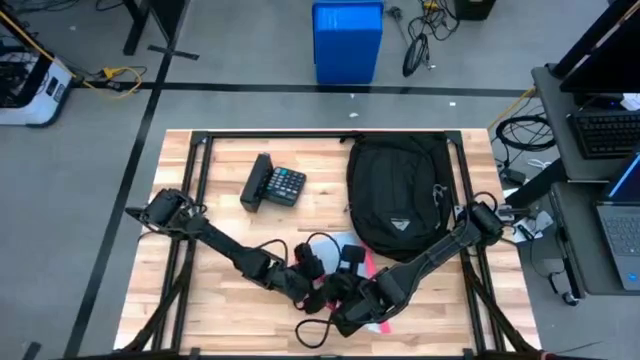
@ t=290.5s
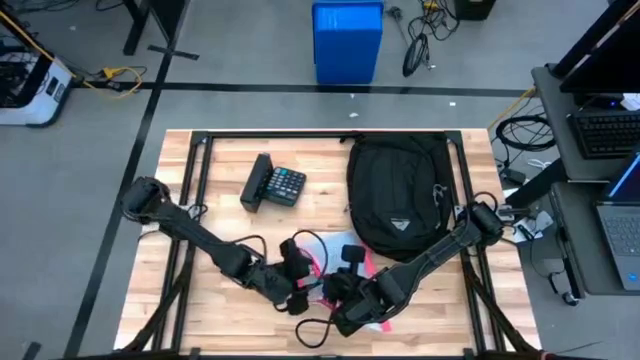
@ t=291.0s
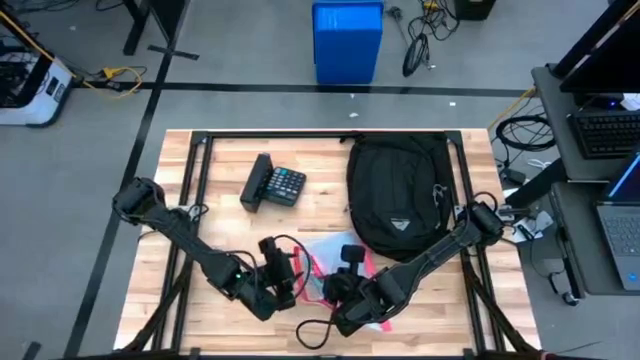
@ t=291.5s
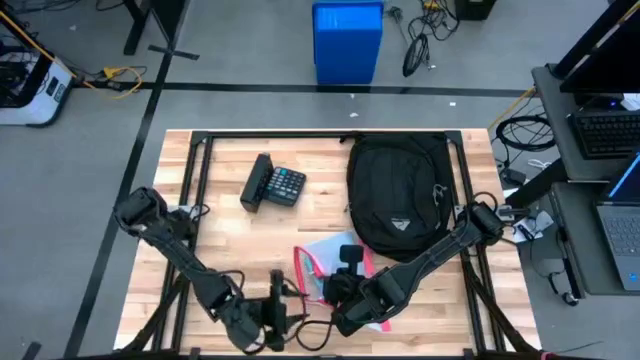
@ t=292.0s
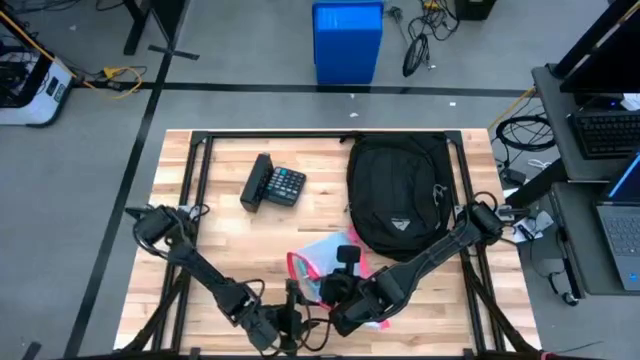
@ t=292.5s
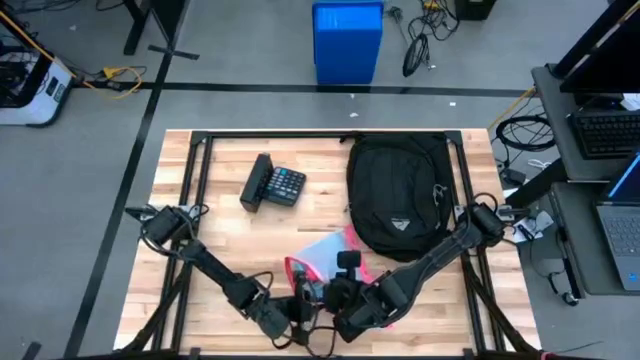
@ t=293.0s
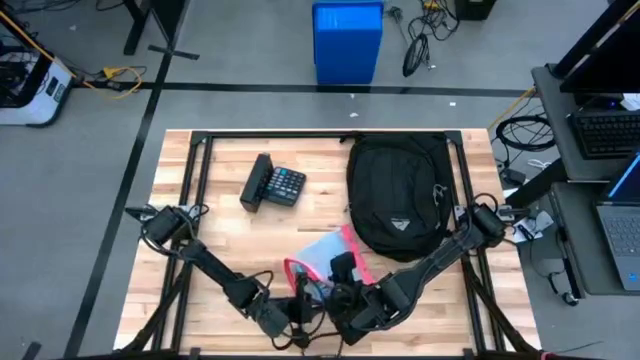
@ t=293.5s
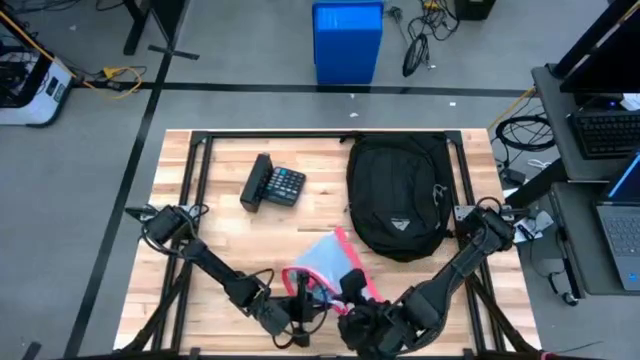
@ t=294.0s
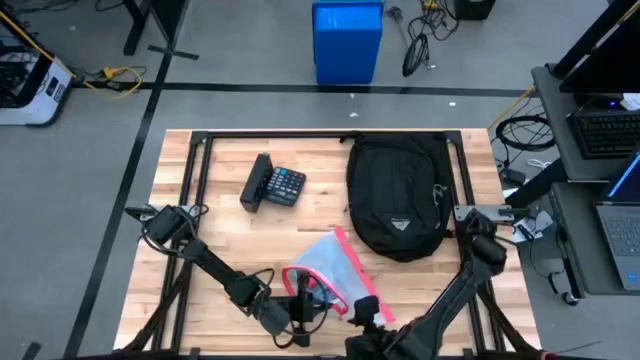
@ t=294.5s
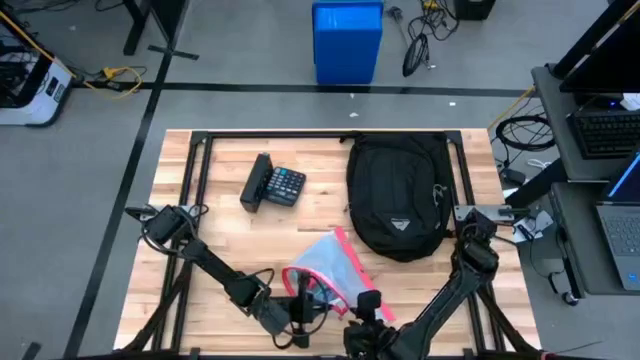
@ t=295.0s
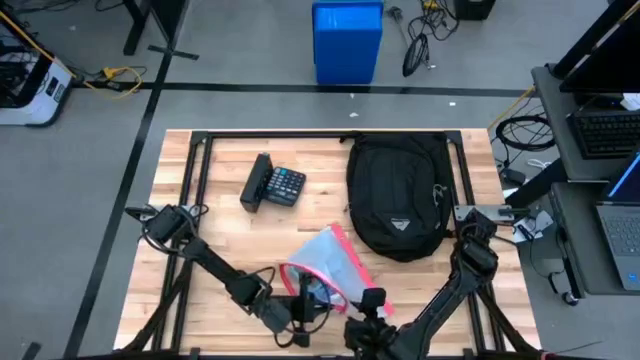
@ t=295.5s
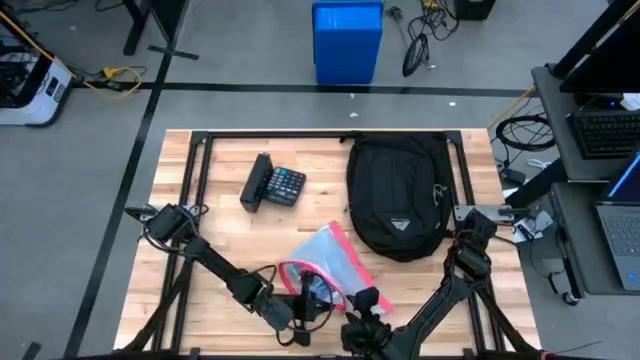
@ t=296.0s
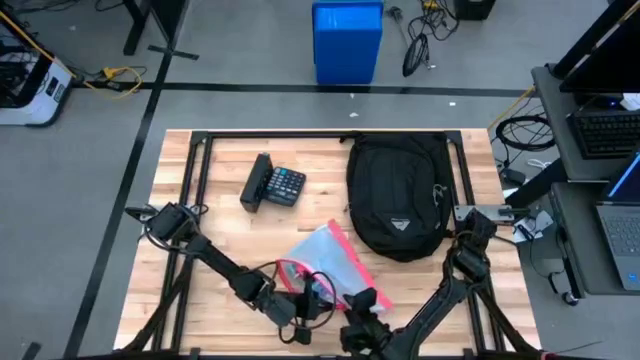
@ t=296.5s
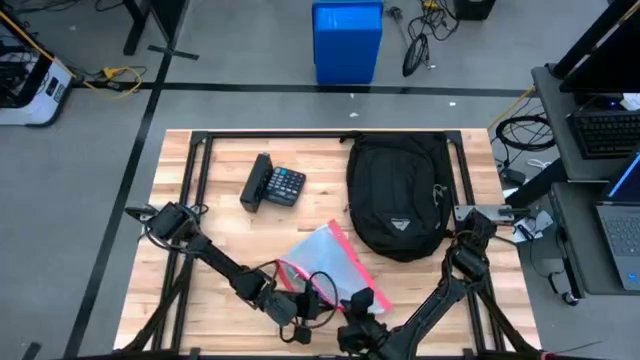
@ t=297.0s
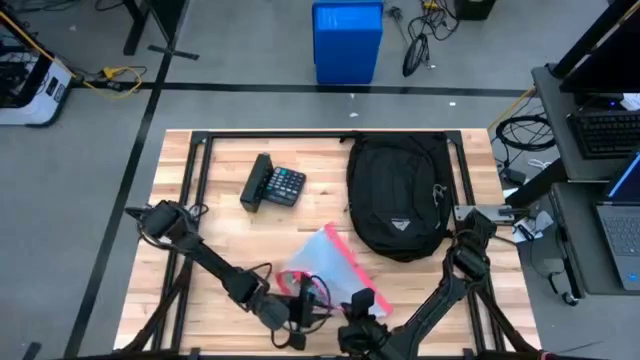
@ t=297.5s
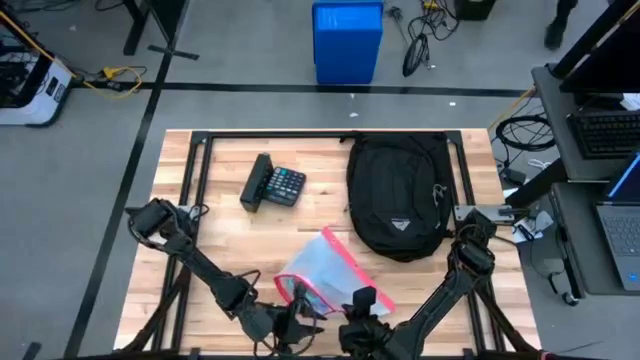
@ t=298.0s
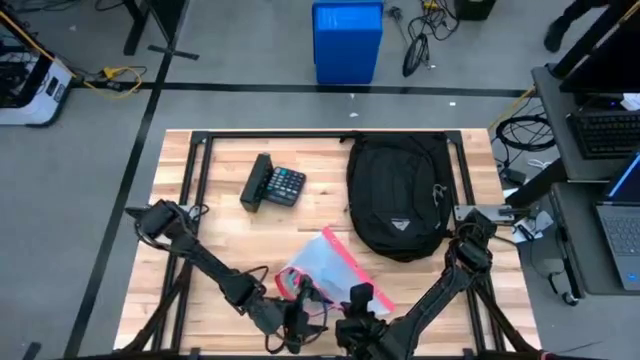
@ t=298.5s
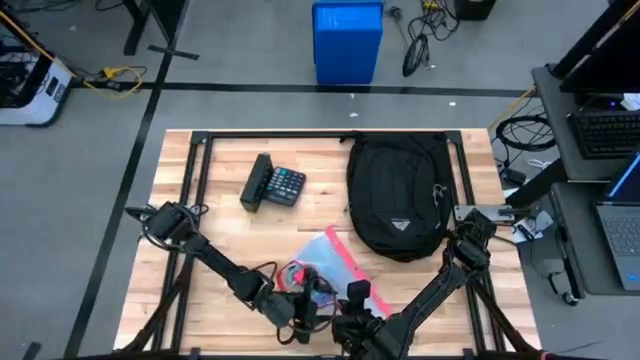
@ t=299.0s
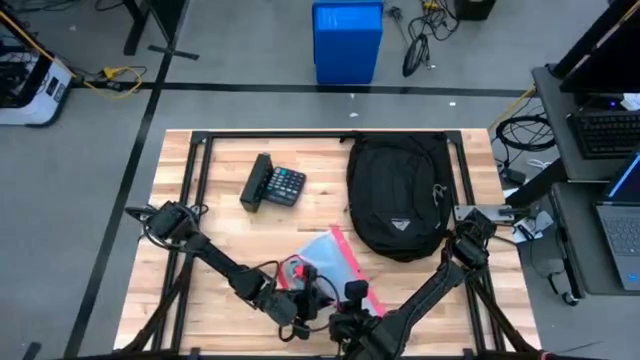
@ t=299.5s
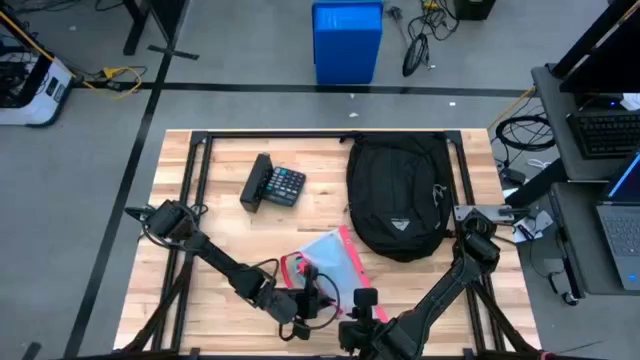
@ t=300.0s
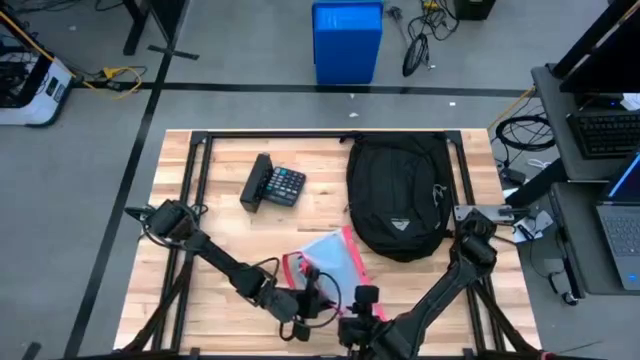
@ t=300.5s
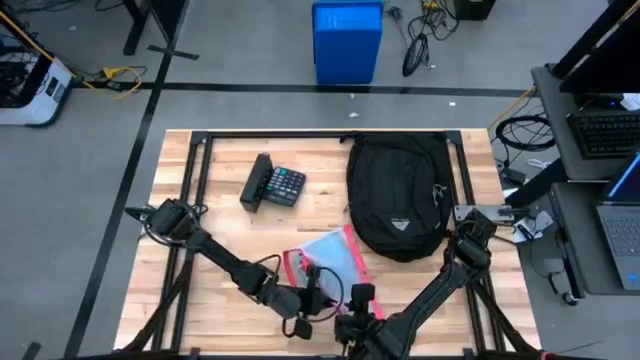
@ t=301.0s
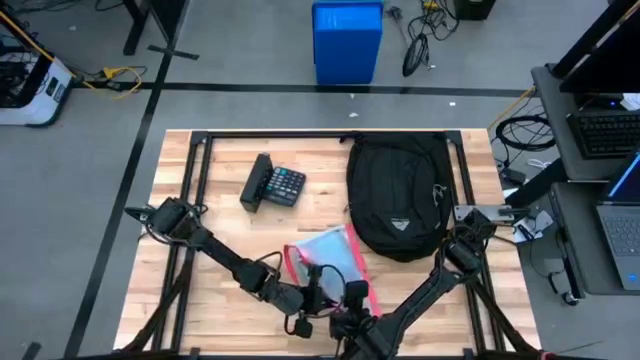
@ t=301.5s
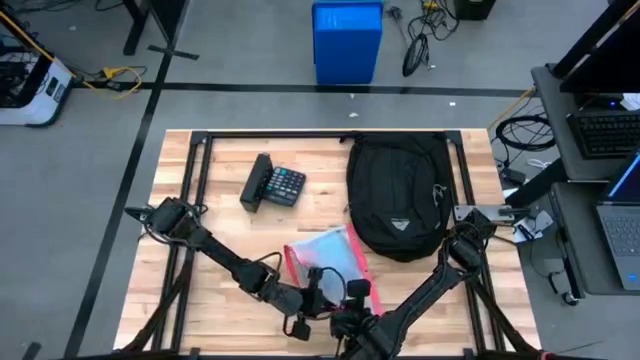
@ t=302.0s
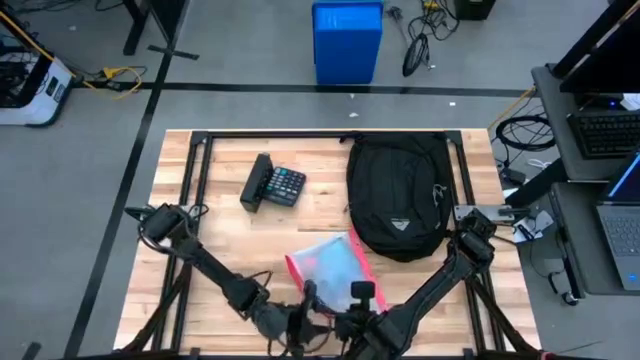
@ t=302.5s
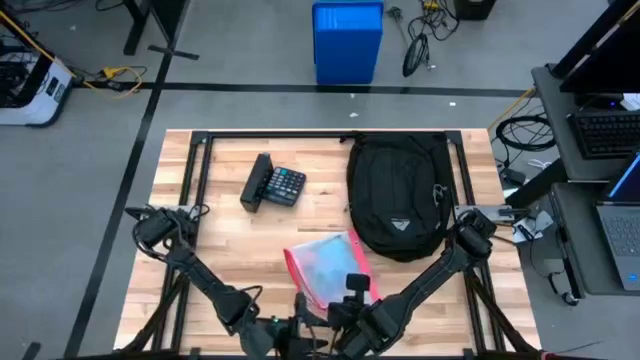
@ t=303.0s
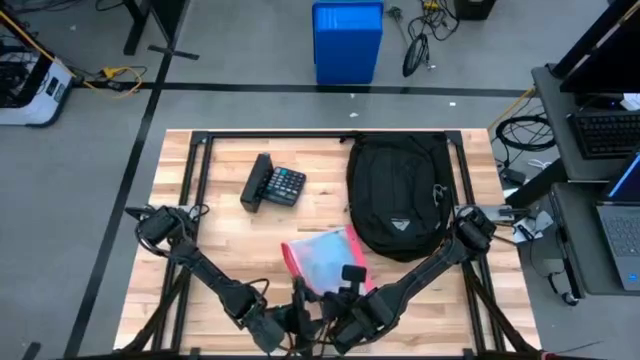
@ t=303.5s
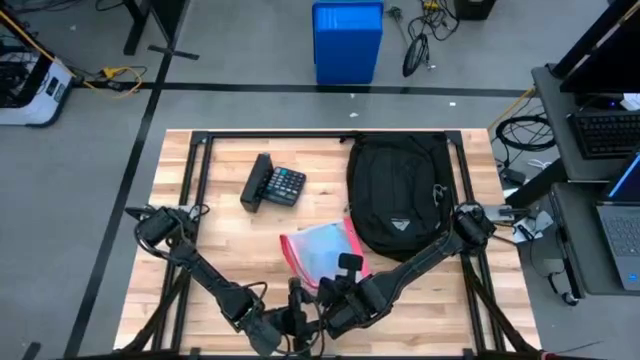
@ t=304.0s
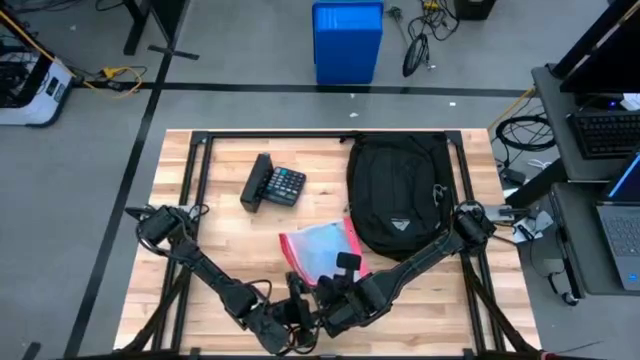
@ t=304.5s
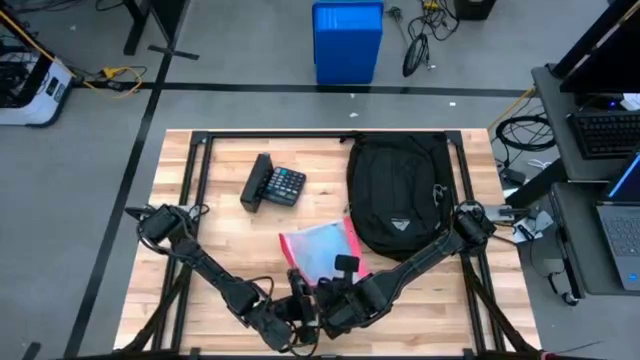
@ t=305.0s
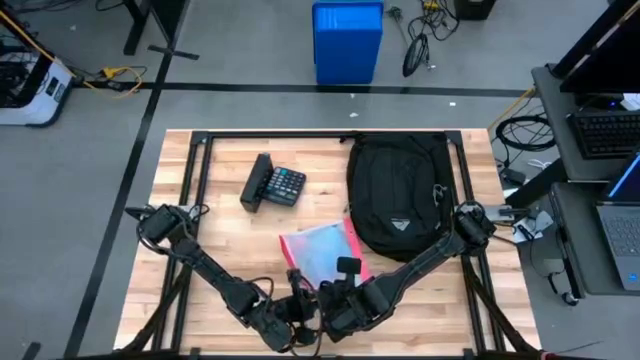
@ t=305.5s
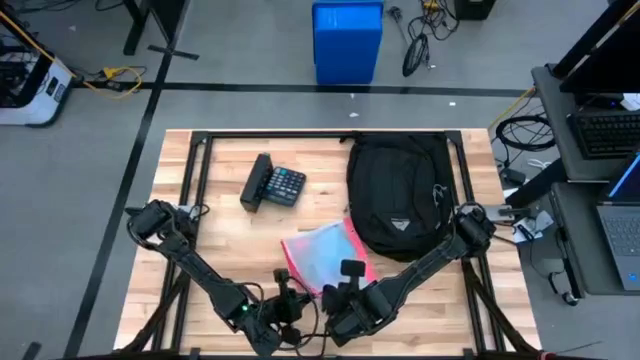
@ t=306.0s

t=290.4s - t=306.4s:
Task: Unpack backpack
Close the white zip bag

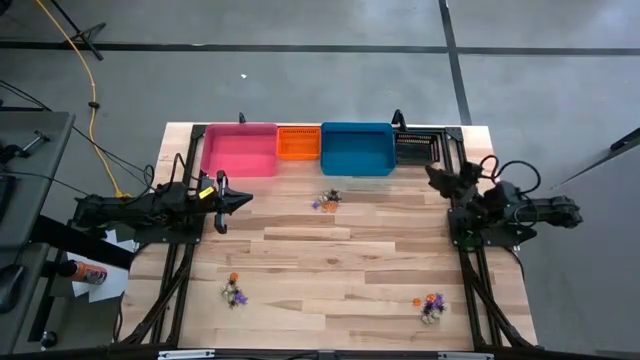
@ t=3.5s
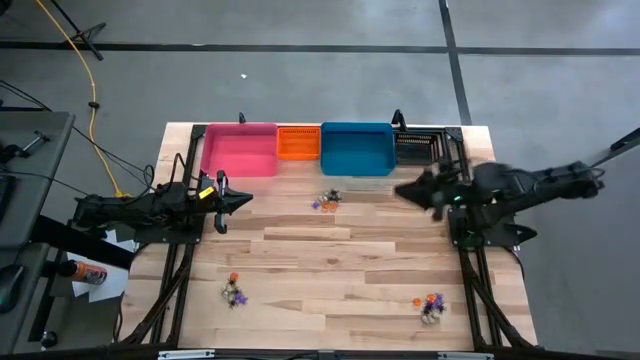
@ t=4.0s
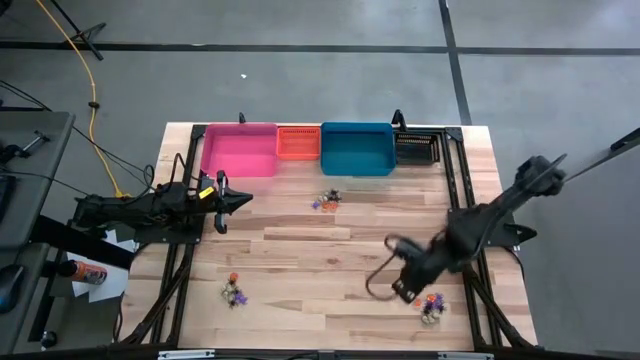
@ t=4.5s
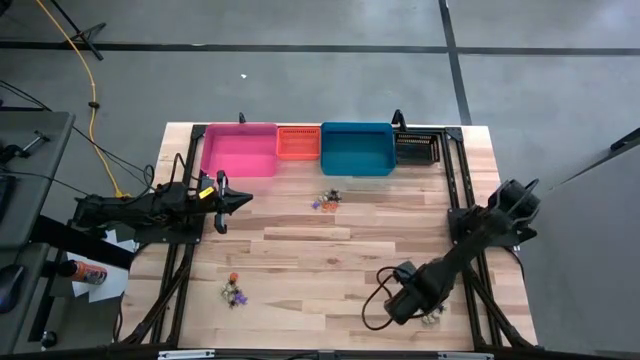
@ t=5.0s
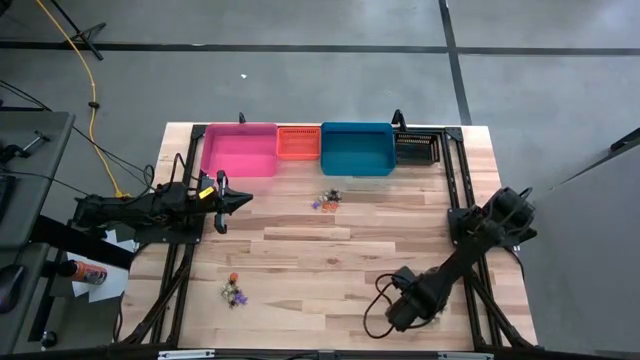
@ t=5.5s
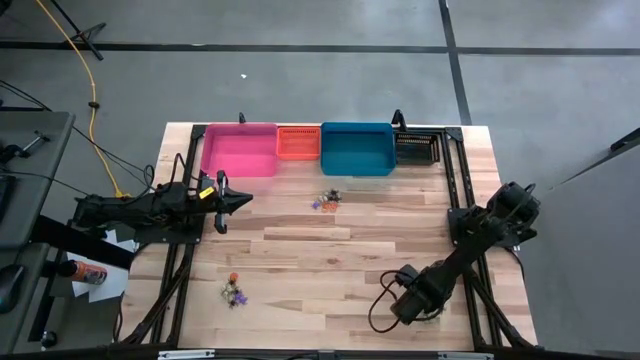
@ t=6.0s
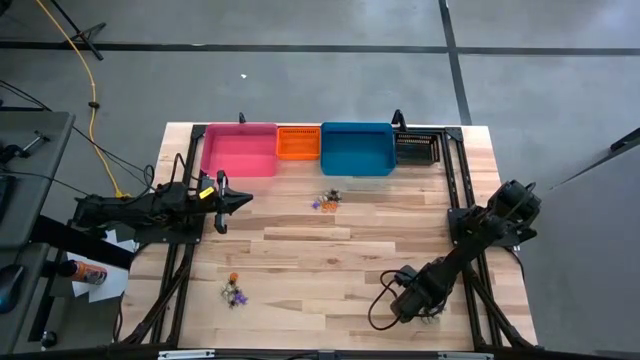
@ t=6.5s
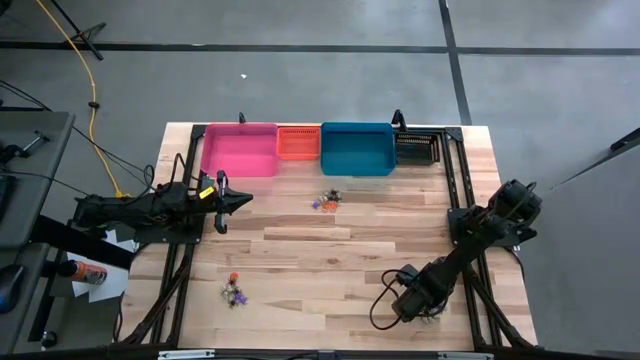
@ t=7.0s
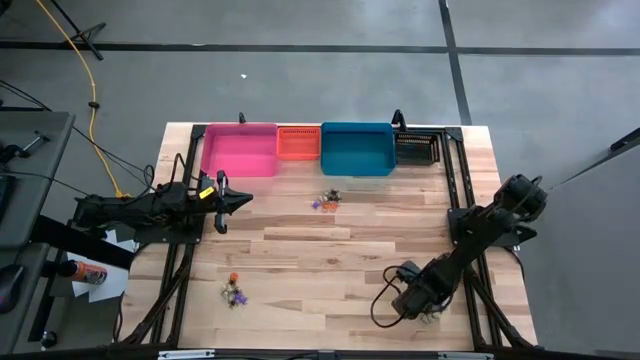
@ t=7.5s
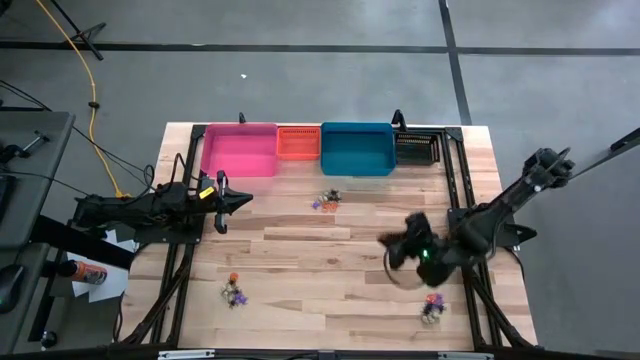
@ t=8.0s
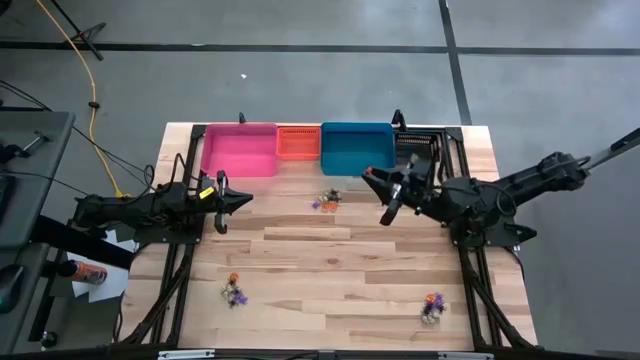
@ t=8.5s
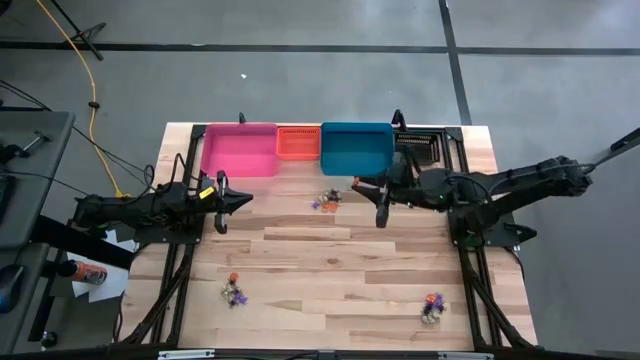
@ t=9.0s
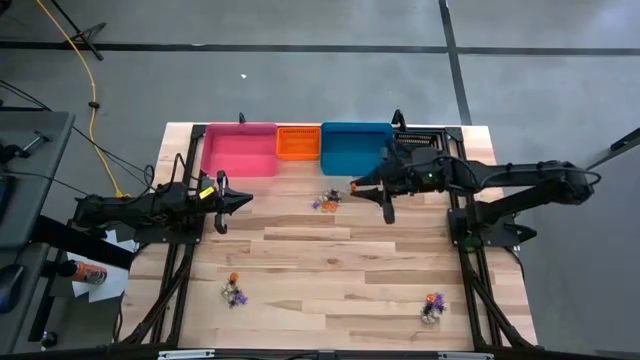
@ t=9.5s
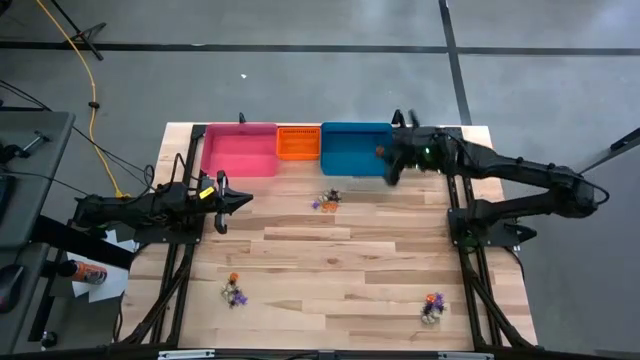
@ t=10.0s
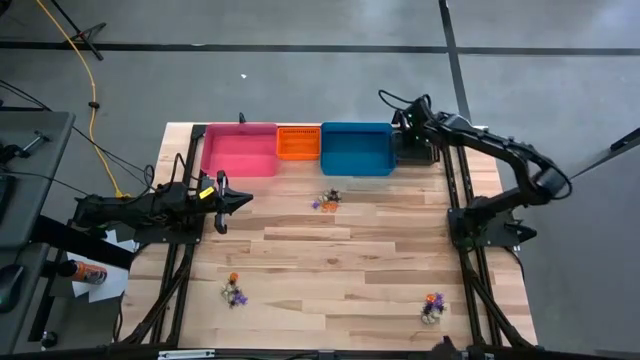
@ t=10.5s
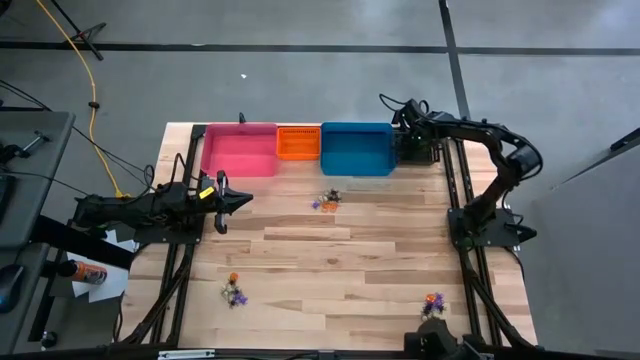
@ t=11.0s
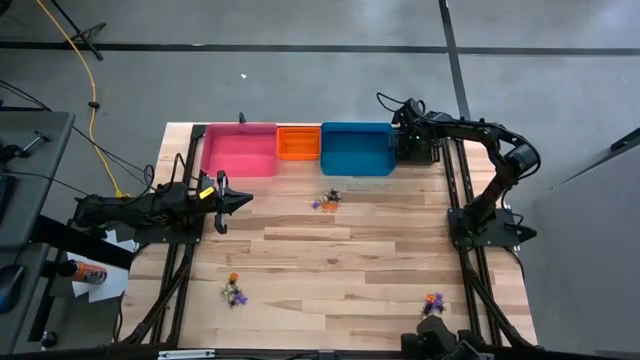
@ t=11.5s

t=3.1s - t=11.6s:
Task: Sort Halloween decoration
Put the orange pumpkin toy into the black bin
